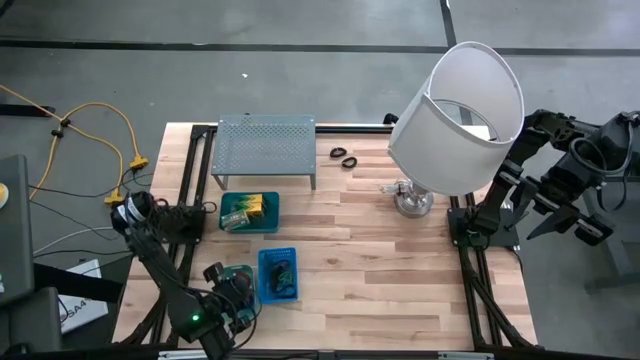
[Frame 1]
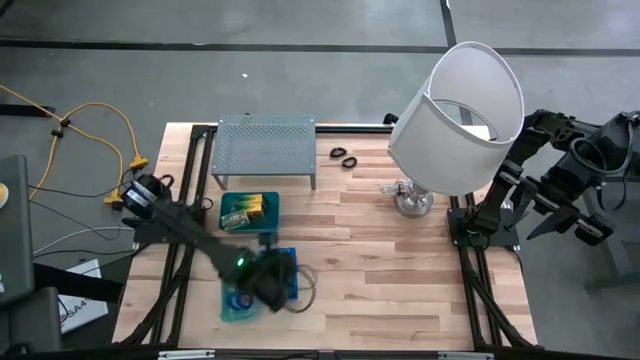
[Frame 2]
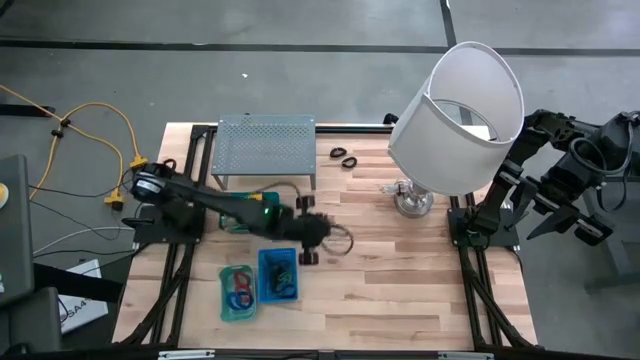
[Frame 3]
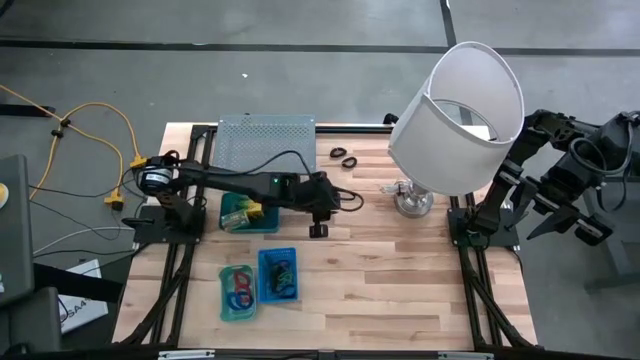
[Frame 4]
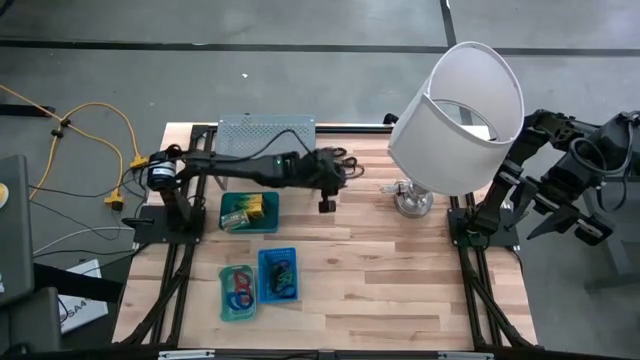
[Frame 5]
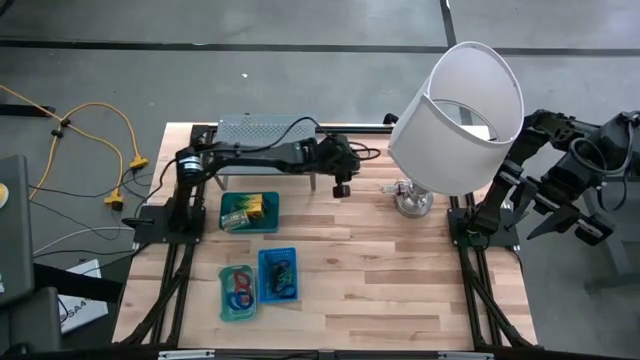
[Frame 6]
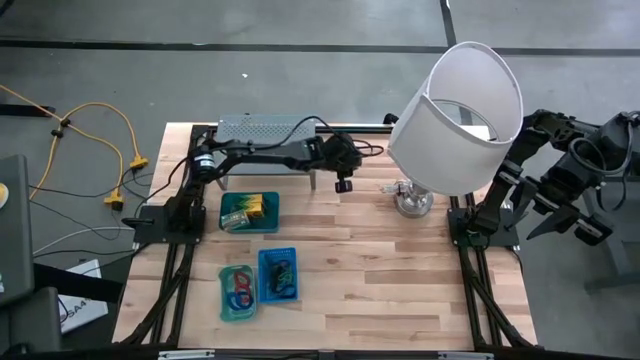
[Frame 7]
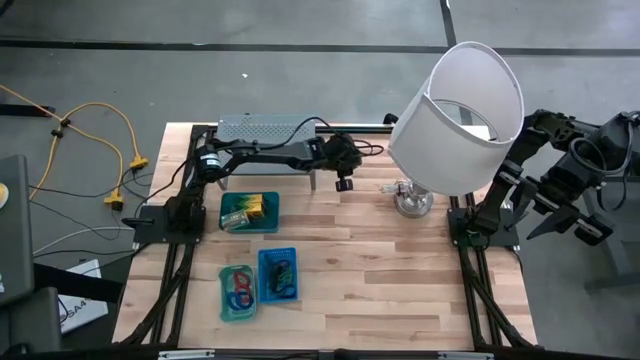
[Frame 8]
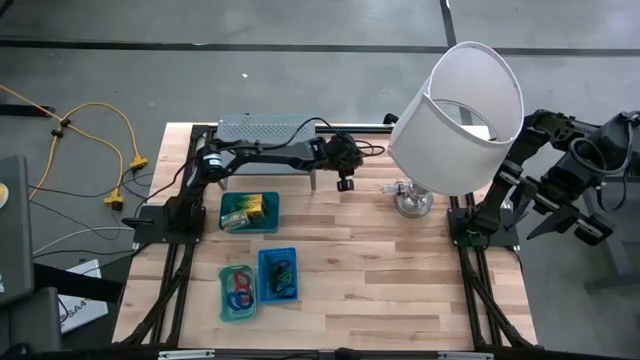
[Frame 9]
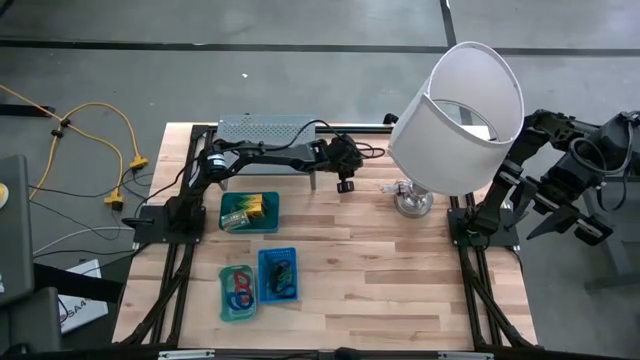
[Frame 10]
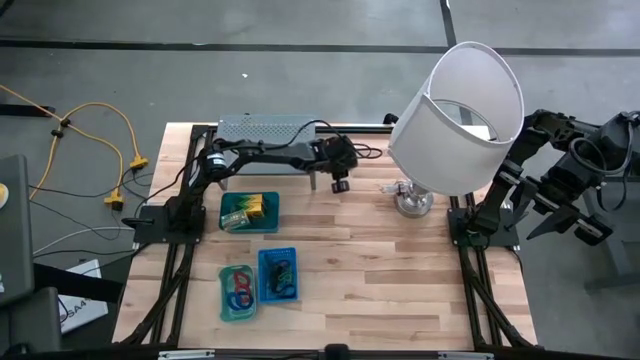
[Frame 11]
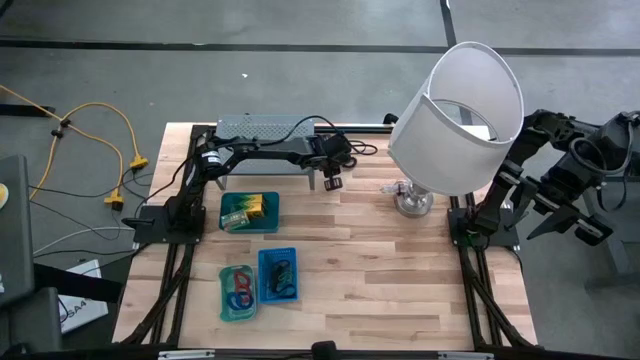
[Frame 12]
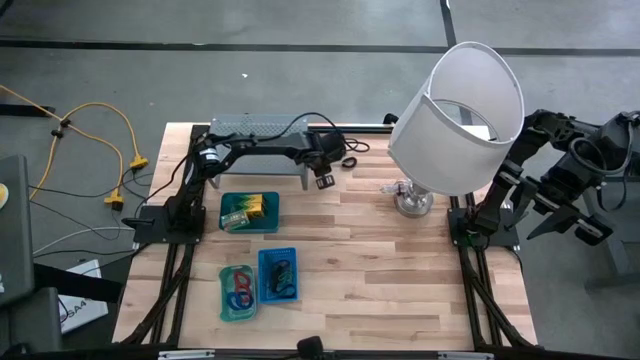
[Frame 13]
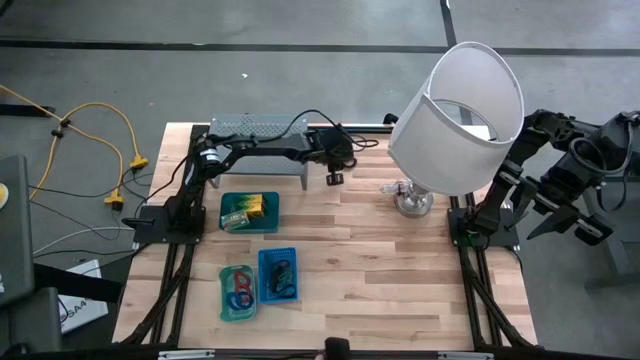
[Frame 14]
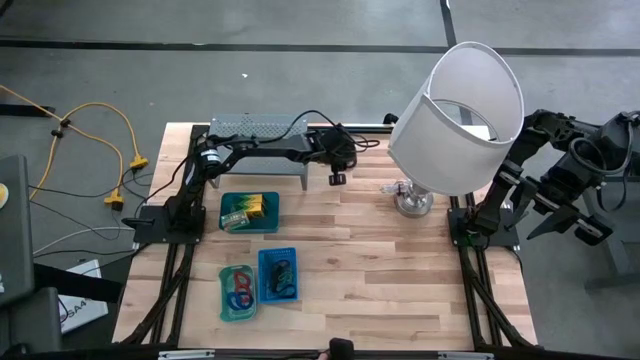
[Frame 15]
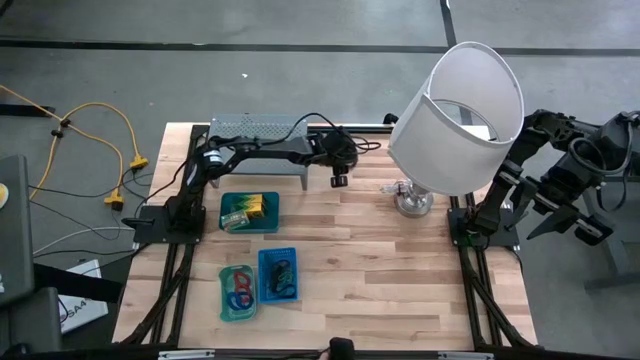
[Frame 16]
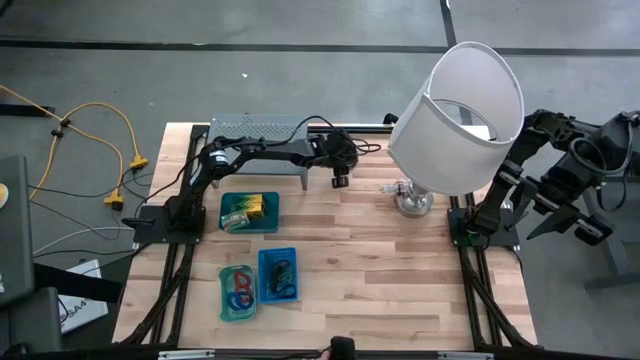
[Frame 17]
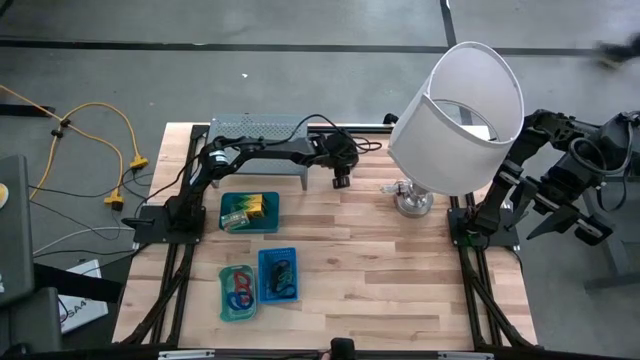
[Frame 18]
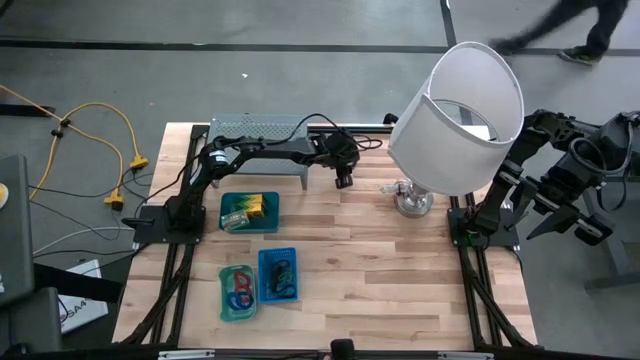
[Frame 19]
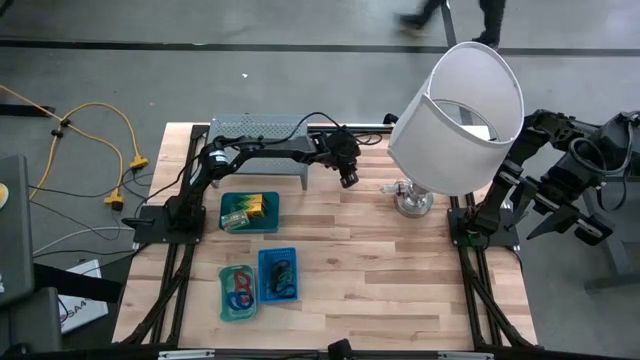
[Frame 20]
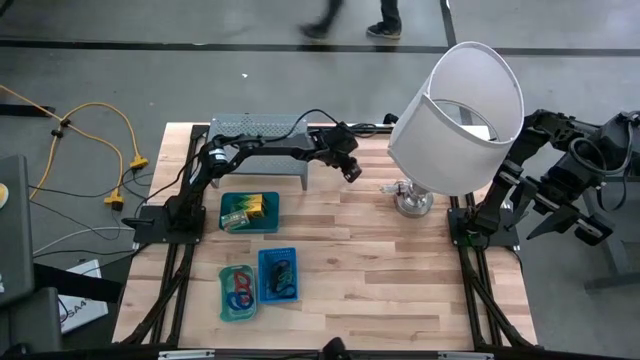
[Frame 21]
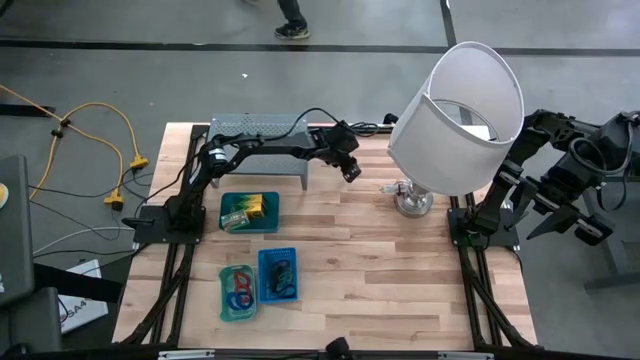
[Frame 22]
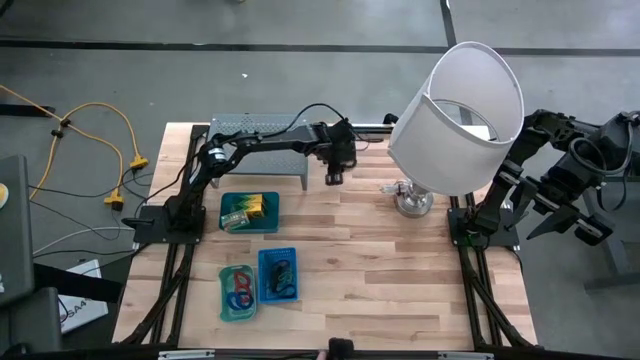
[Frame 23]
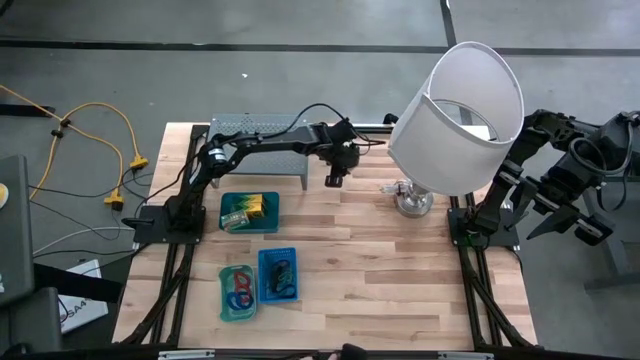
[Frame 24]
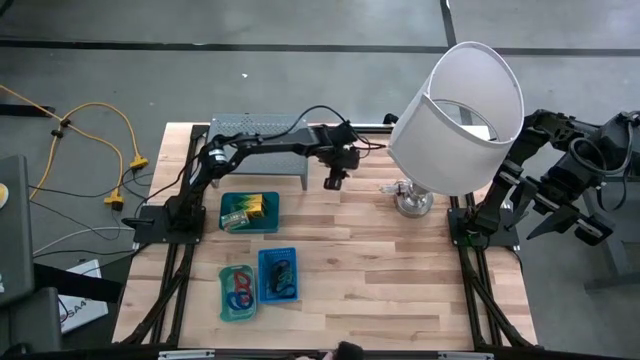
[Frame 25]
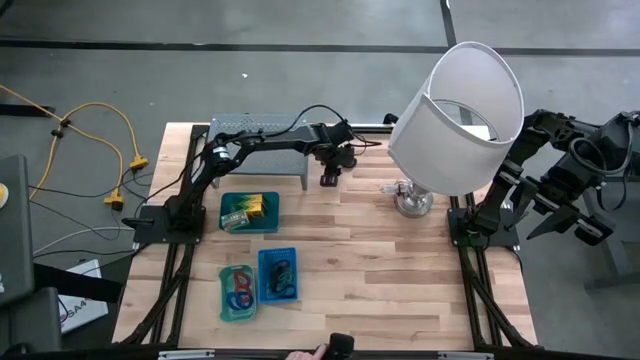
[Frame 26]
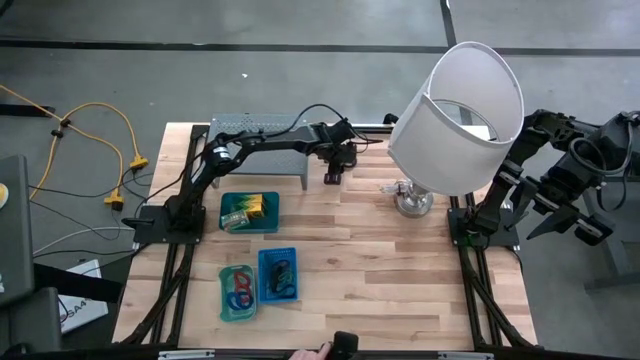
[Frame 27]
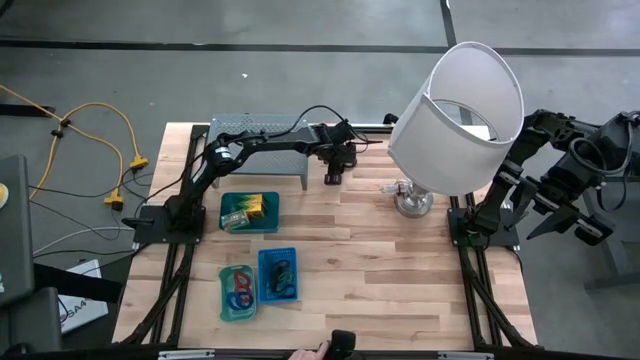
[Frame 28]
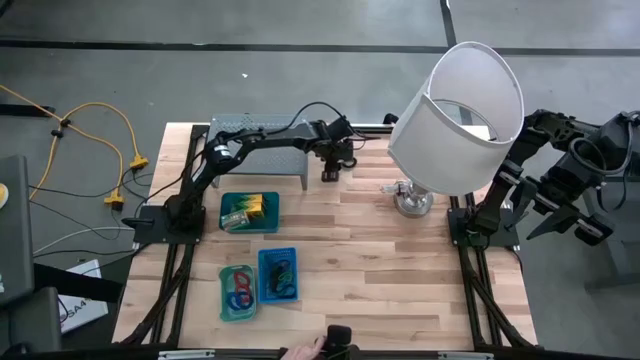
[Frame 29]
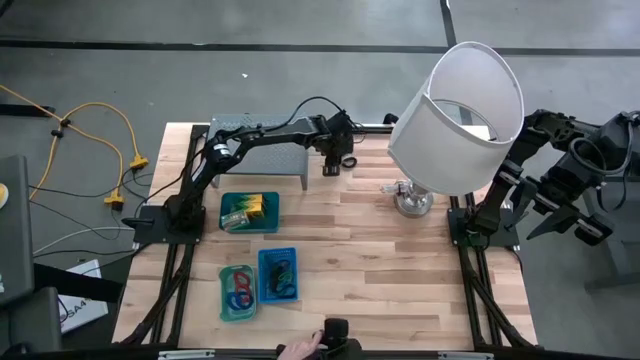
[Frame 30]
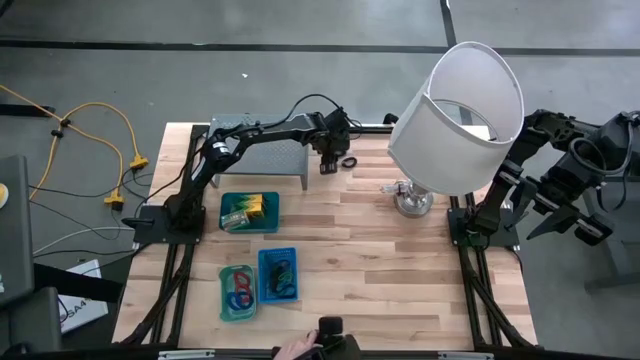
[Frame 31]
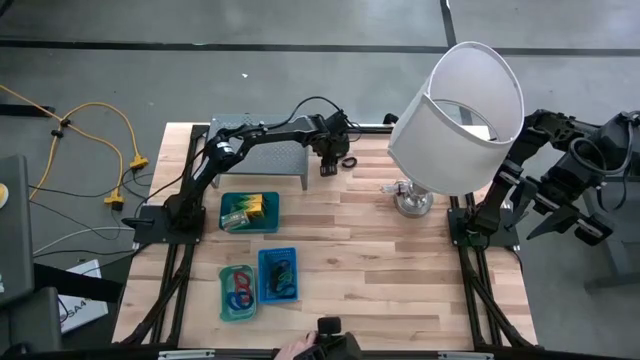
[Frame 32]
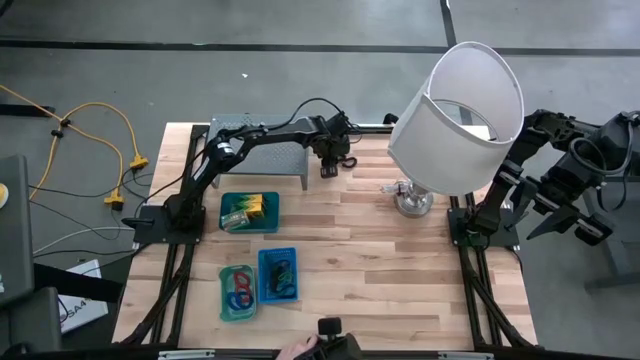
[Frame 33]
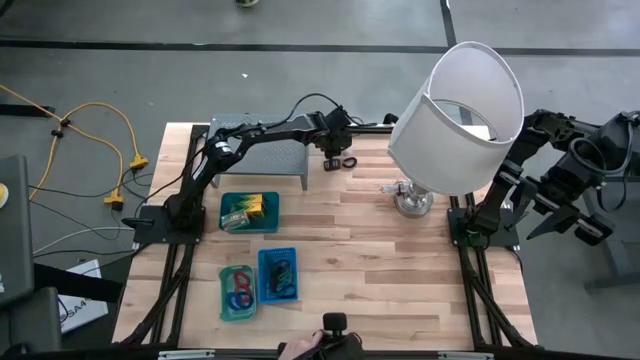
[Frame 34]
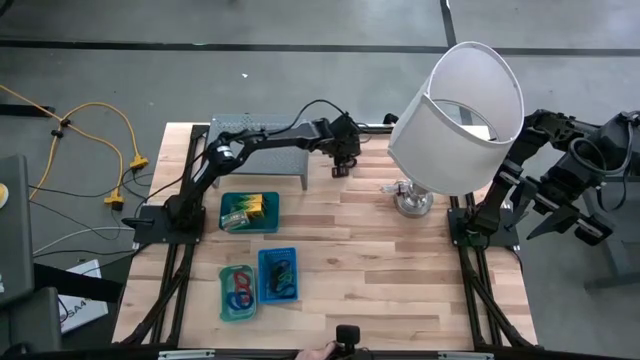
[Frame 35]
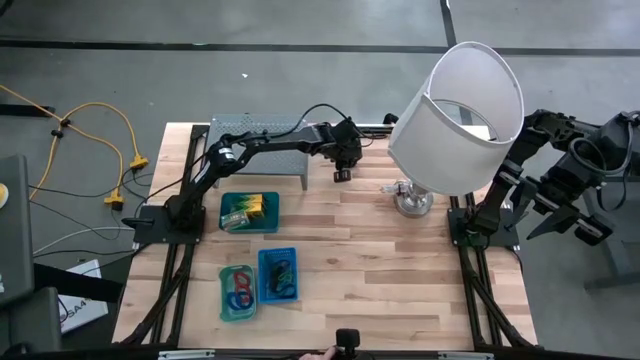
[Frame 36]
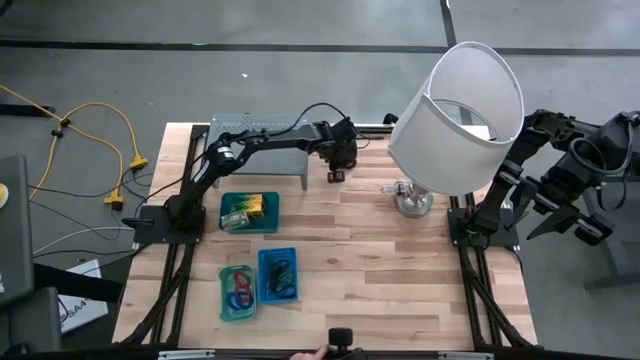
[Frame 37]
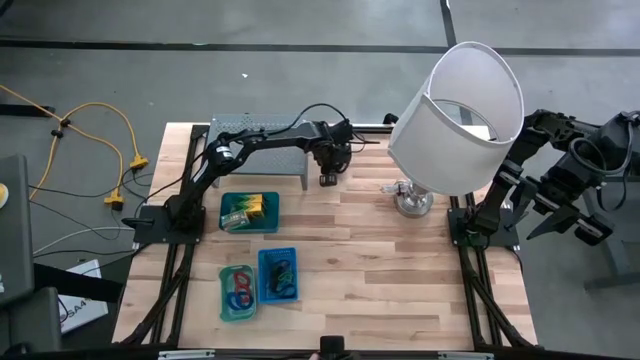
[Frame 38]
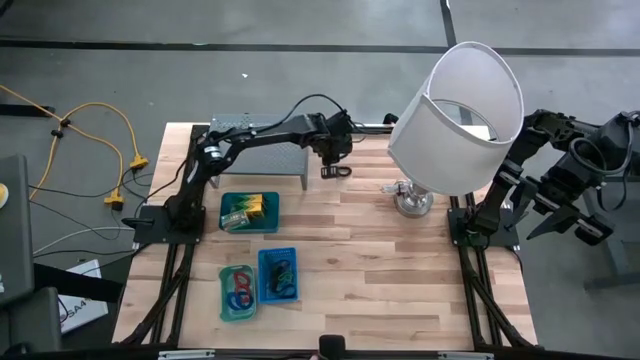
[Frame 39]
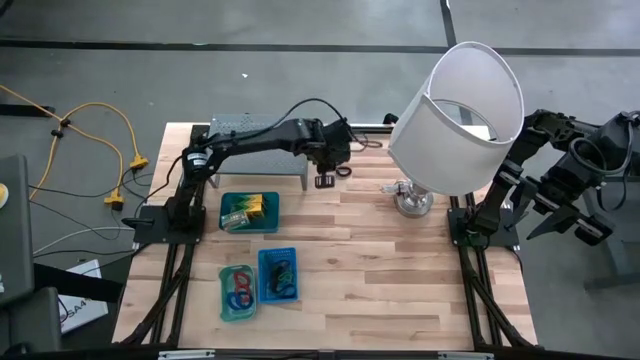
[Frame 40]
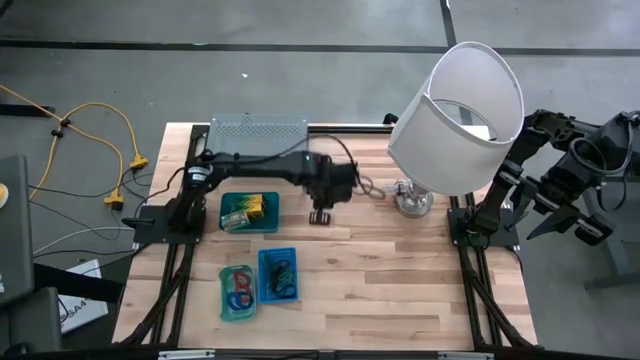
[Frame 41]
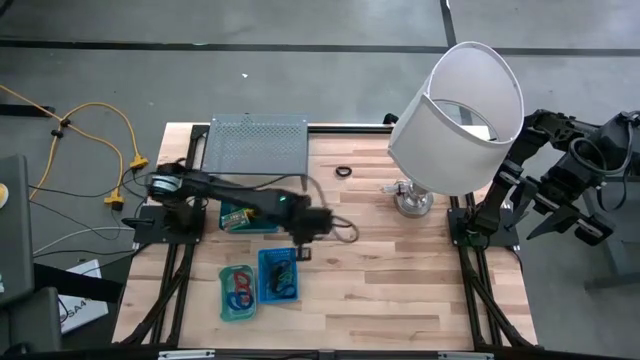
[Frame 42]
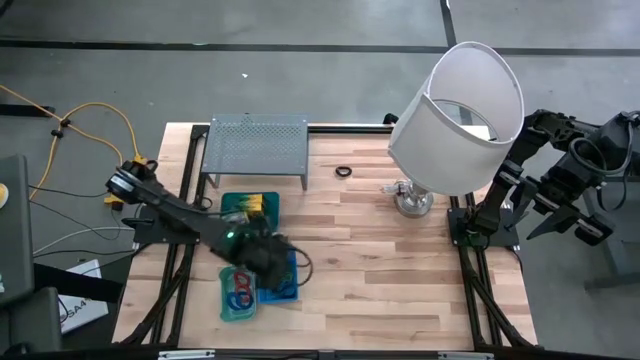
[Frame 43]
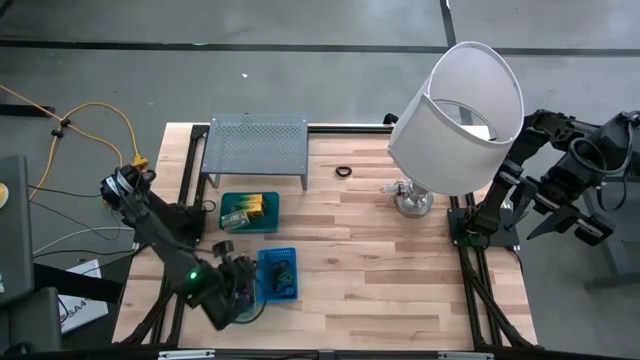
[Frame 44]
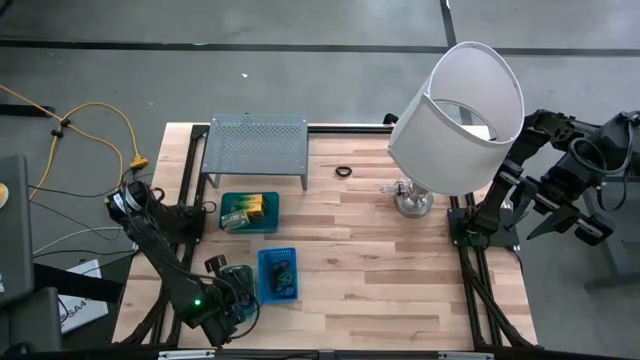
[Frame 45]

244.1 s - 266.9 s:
Task: Pick & Place Office Desk Supplies
Put the top black spring keychain into the green bin
